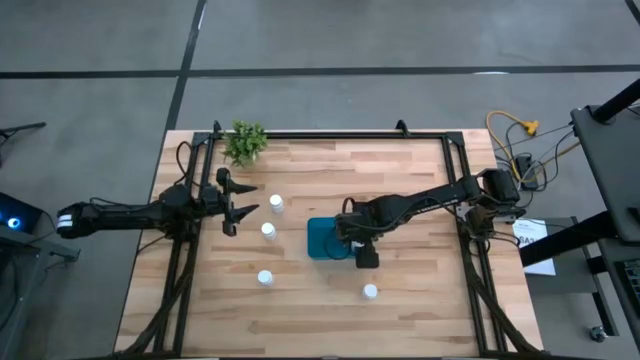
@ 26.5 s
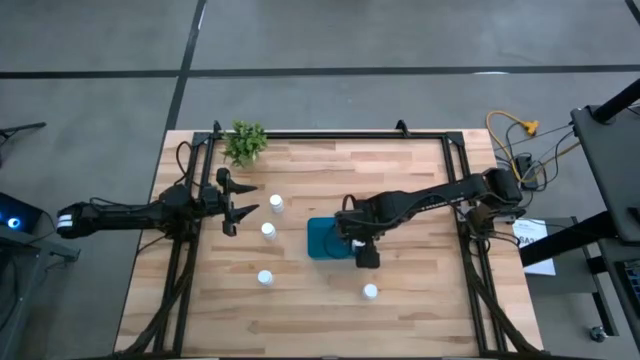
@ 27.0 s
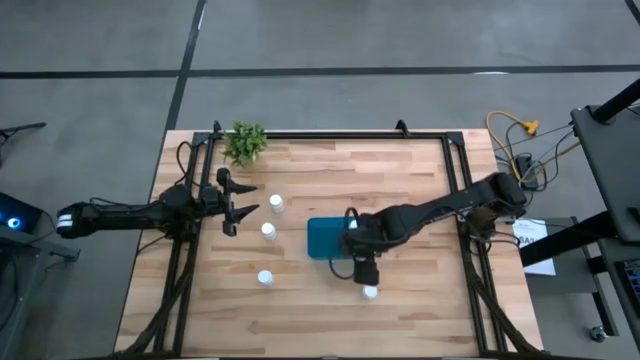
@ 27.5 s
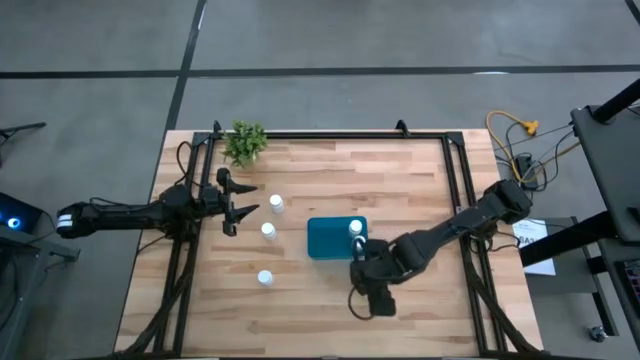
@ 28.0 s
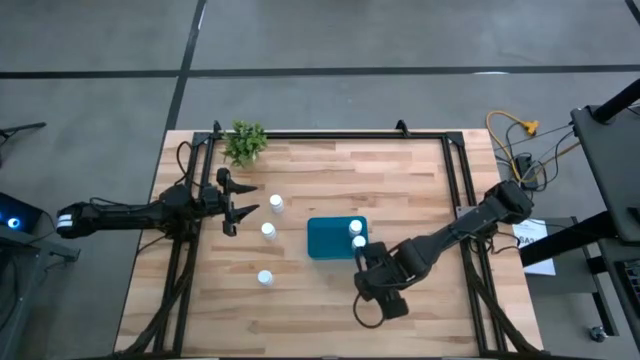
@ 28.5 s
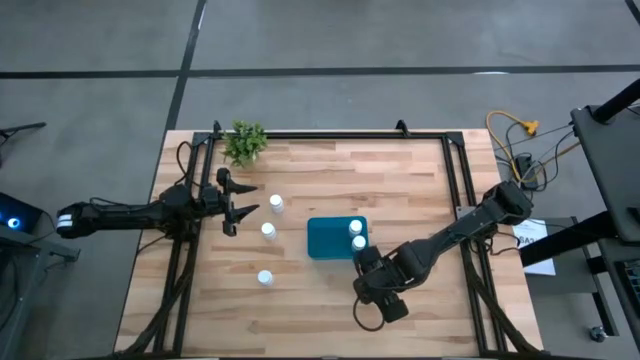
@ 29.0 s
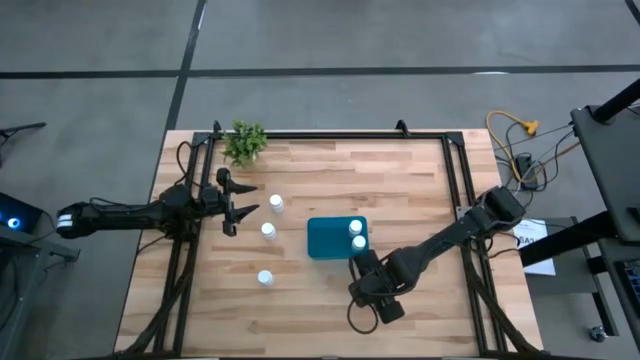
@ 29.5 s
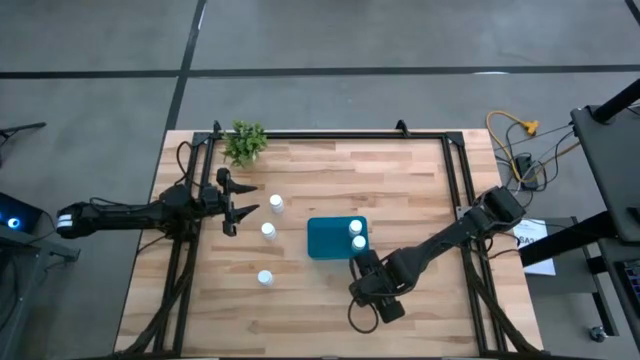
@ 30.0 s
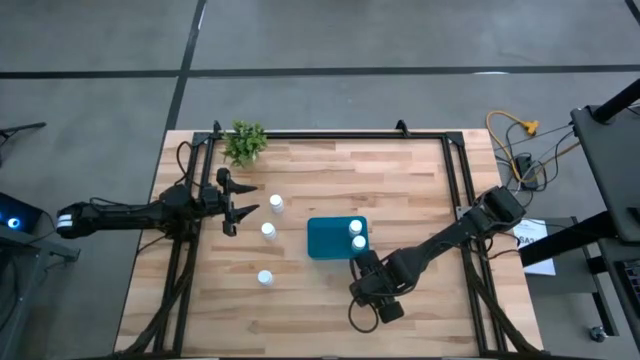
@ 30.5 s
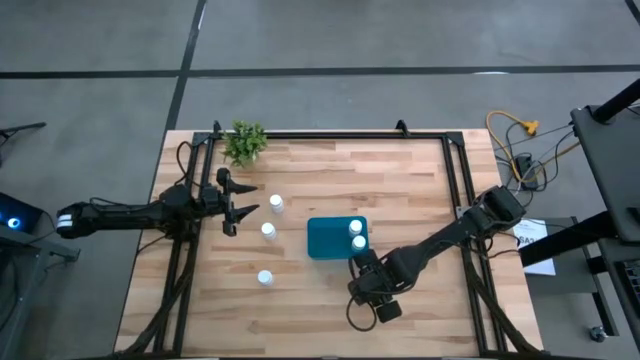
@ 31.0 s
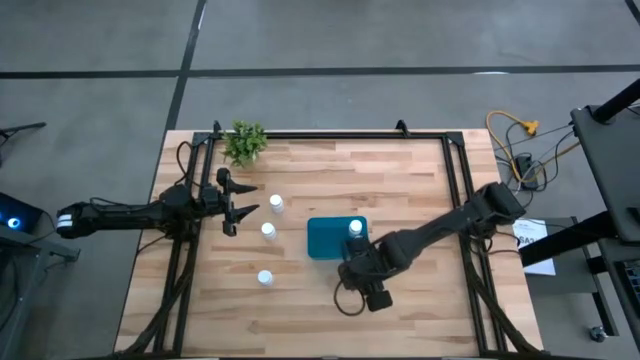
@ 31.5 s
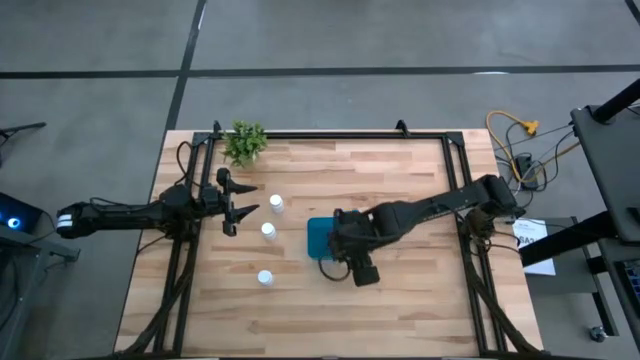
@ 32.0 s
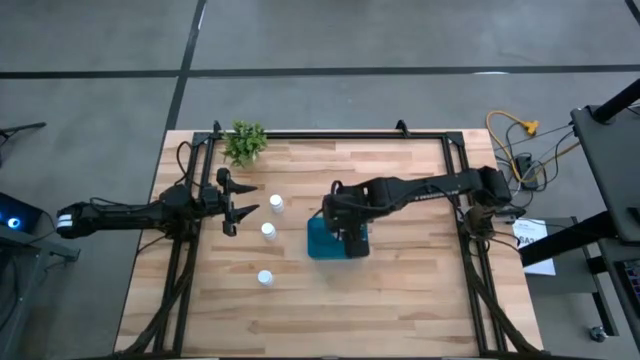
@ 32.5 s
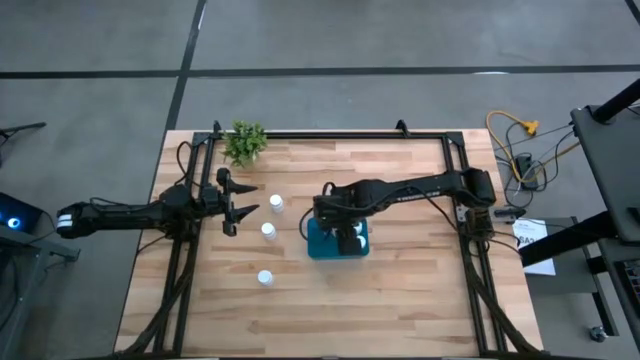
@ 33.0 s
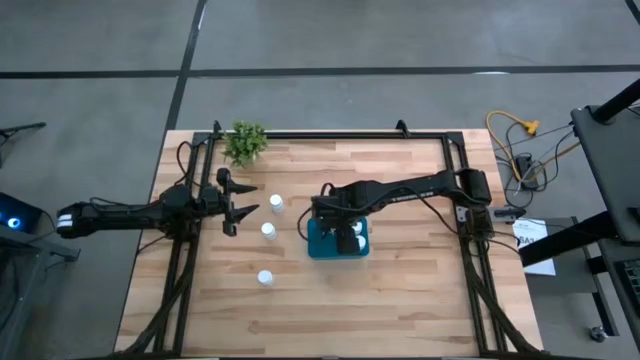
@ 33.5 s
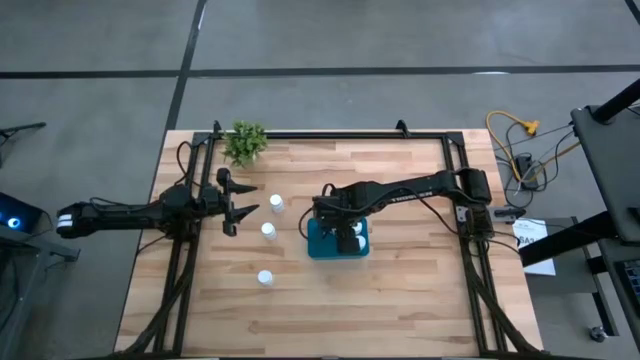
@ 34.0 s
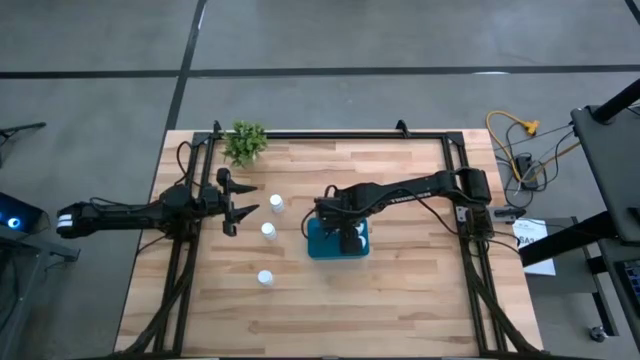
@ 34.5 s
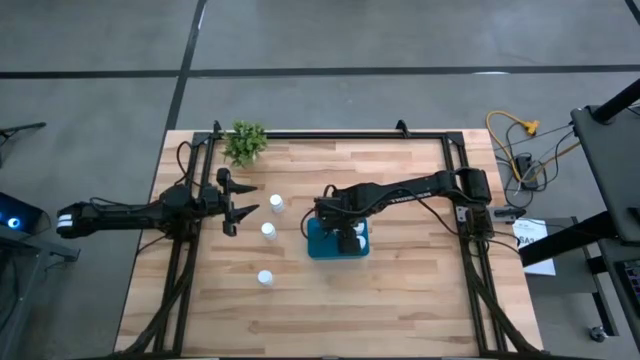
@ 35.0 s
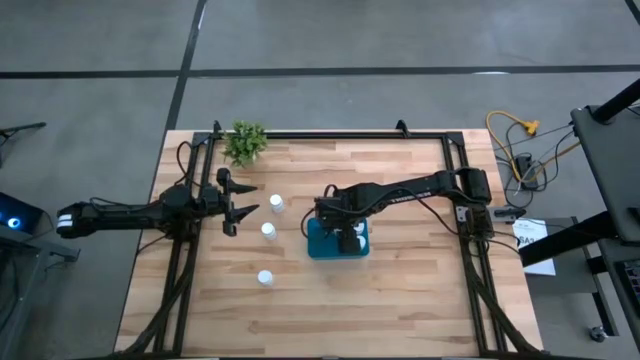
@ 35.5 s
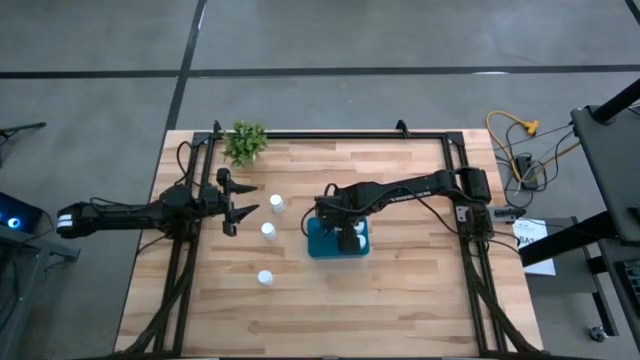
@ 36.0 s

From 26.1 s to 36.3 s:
Task: Pick and place pill bottles into a basket
Put the white pill bottle into the blue bin

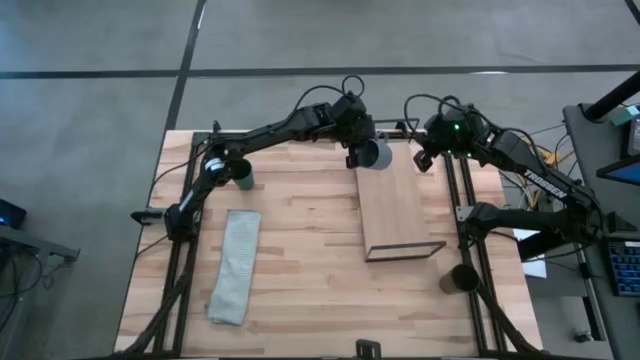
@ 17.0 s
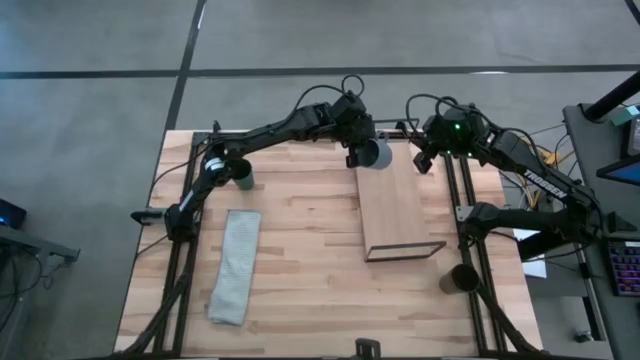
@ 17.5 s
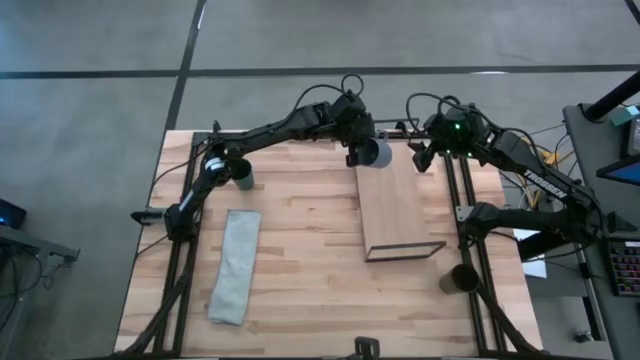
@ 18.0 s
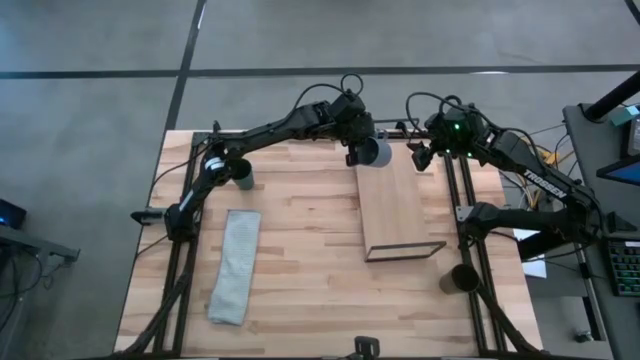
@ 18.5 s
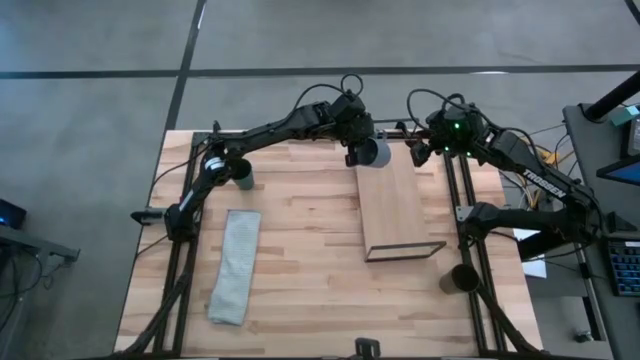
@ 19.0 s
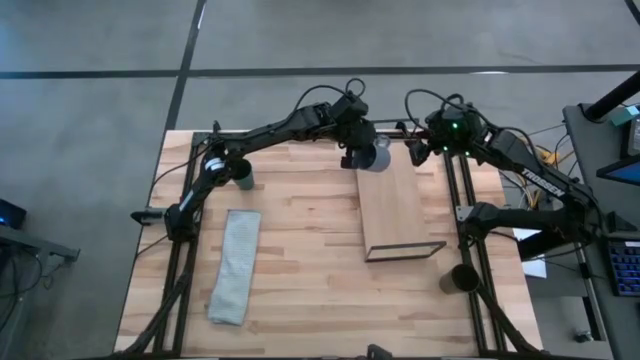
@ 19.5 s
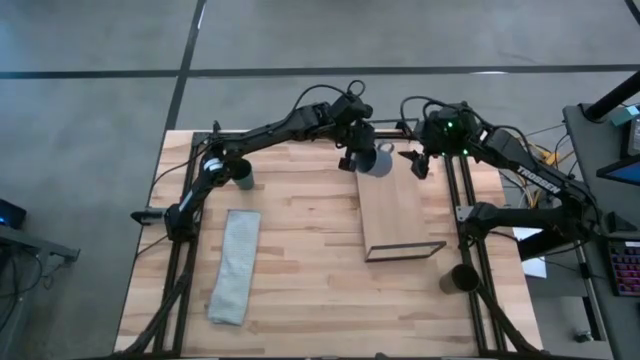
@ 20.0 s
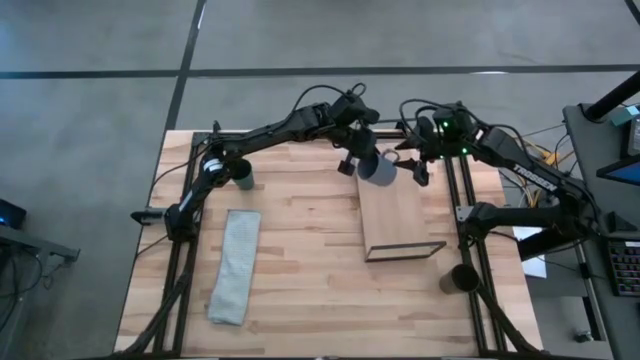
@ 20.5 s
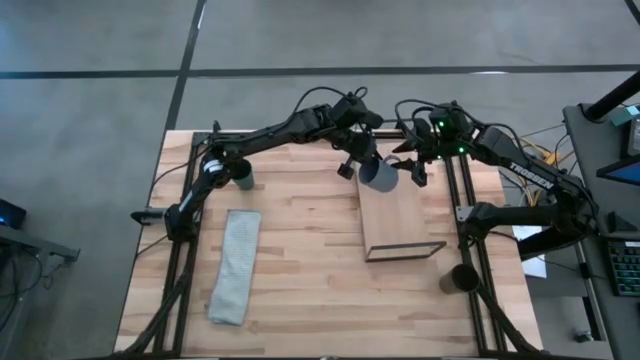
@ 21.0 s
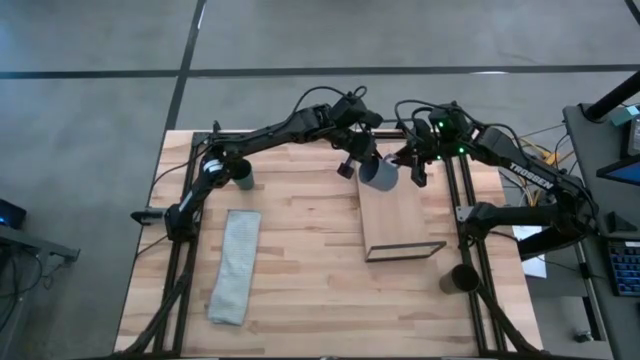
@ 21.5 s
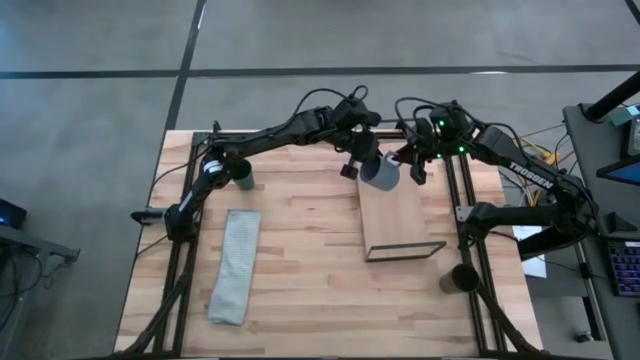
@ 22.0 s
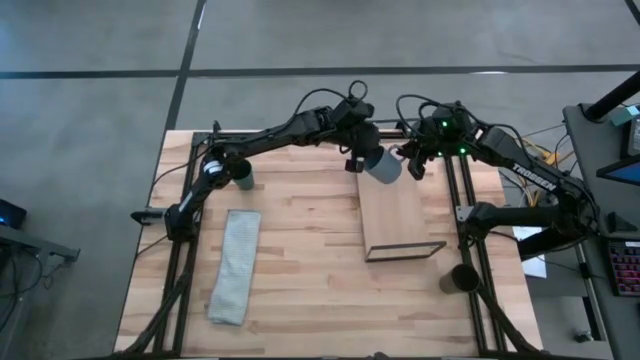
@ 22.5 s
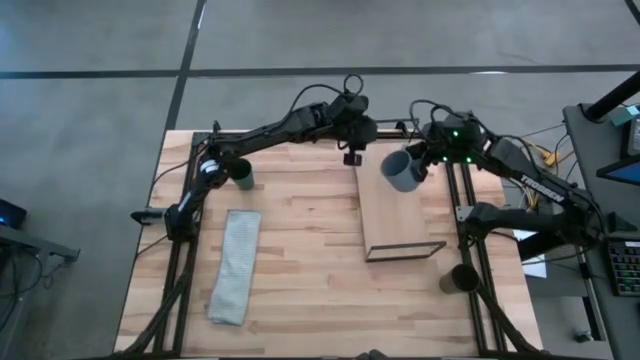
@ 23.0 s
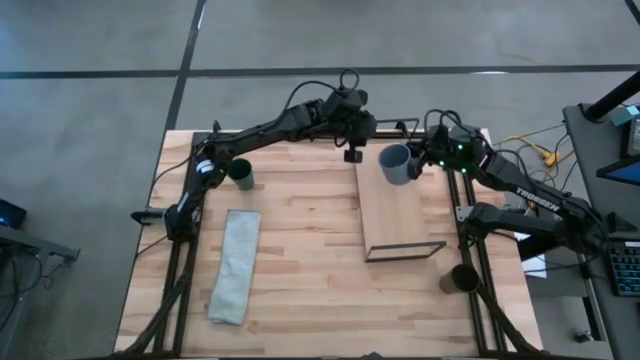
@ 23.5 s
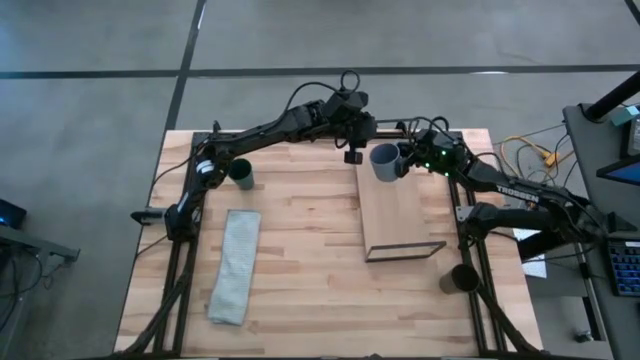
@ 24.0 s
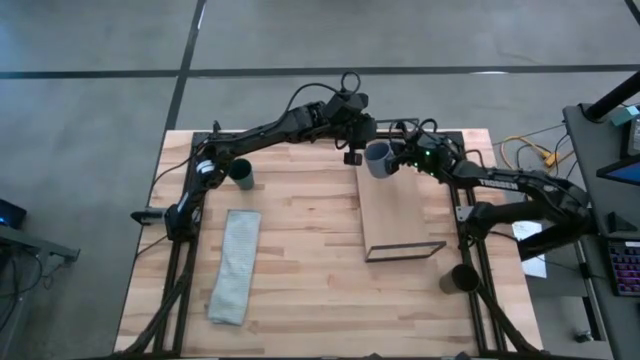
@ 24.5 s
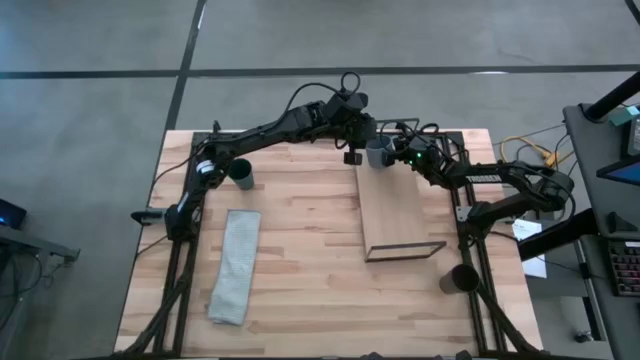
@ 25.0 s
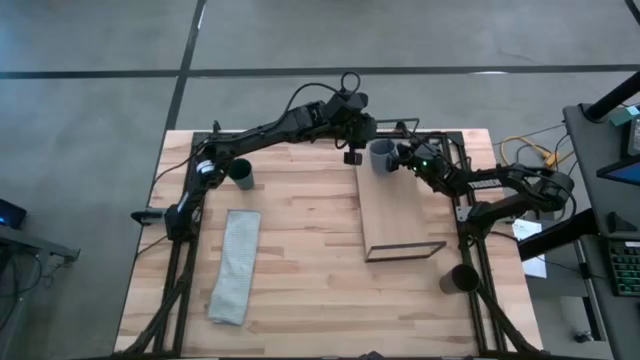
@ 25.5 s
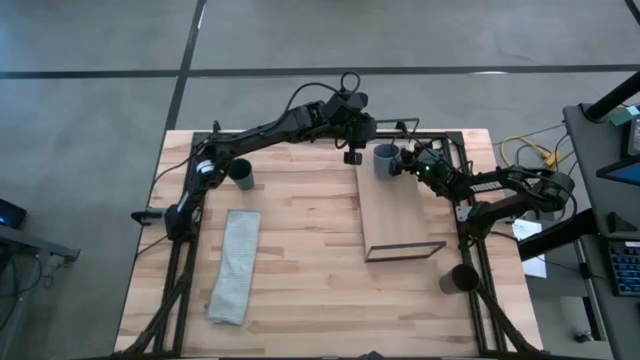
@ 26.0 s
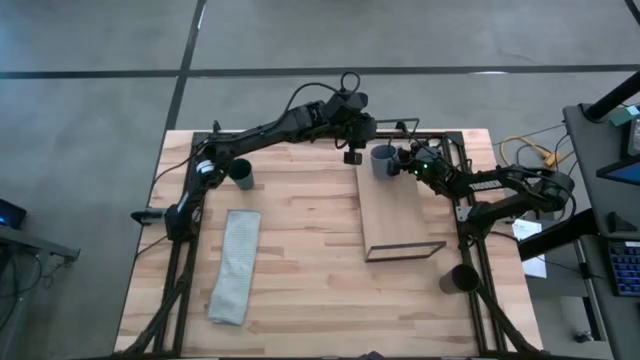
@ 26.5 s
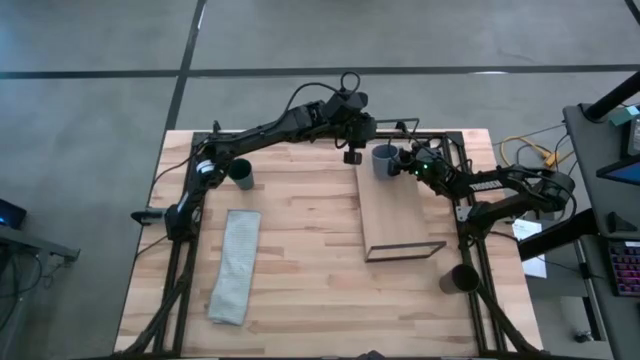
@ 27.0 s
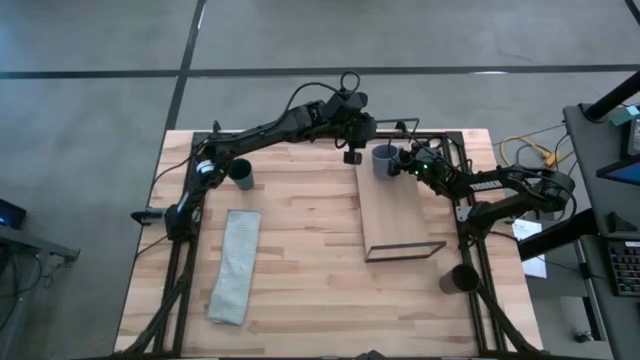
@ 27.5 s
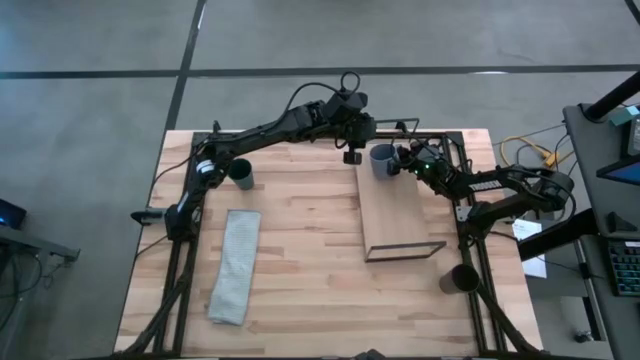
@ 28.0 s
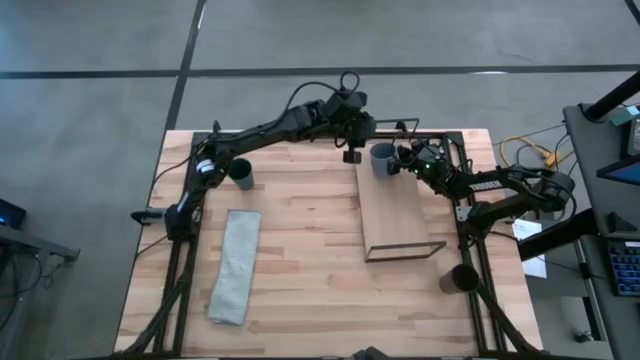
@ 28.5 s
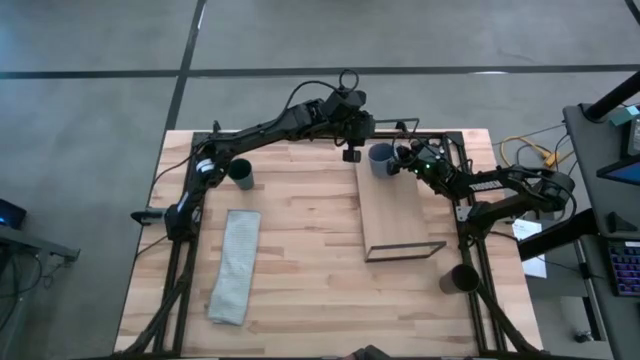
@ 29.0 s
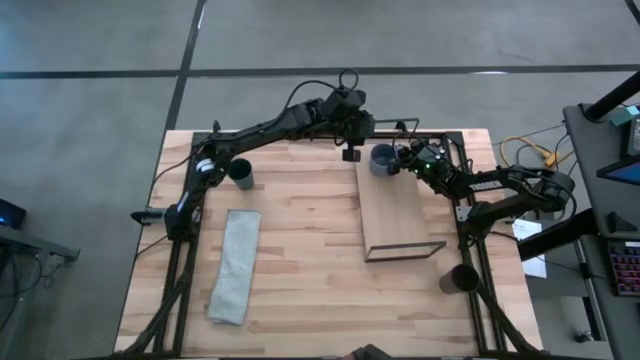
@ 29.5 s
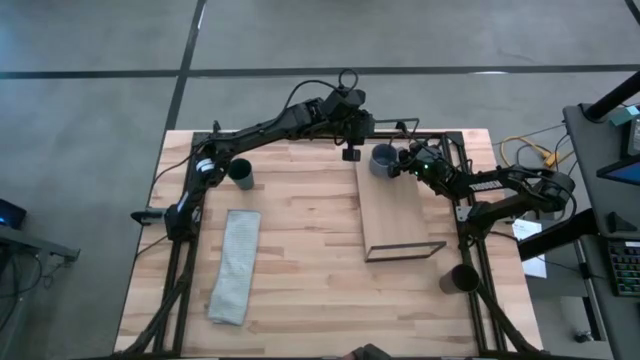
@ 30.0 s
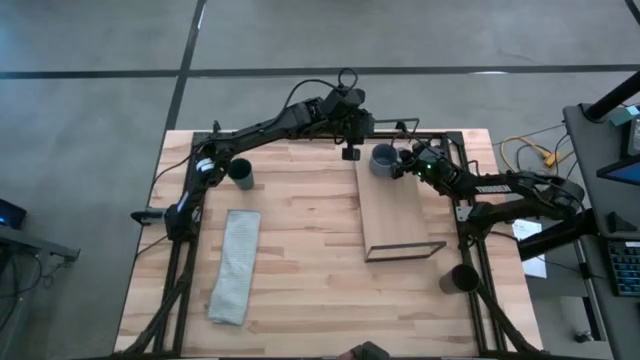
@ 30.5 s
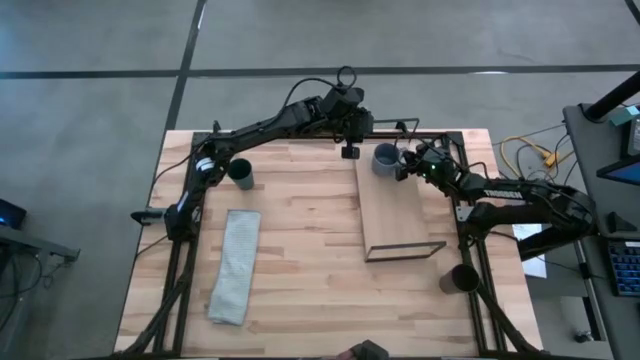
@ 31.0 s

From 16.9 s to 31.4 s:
Task: Stack small to large cups/mugs on shelf
Put the gray mug on the shelf
